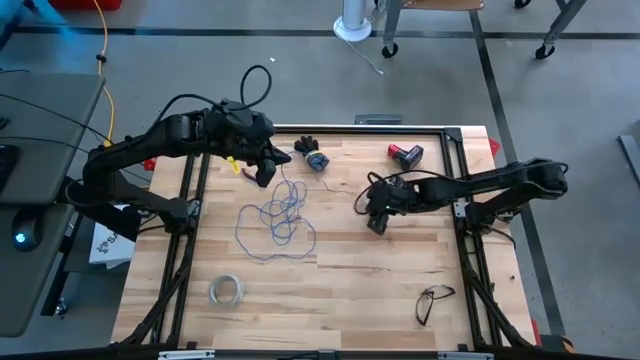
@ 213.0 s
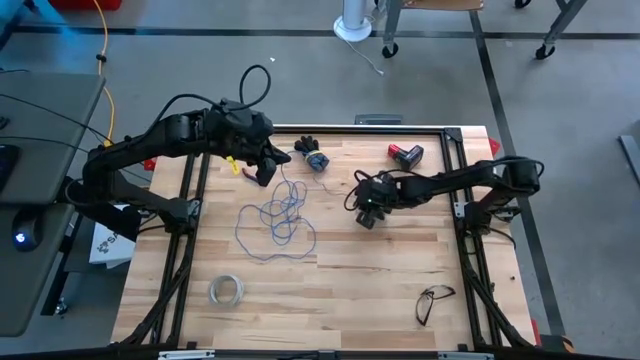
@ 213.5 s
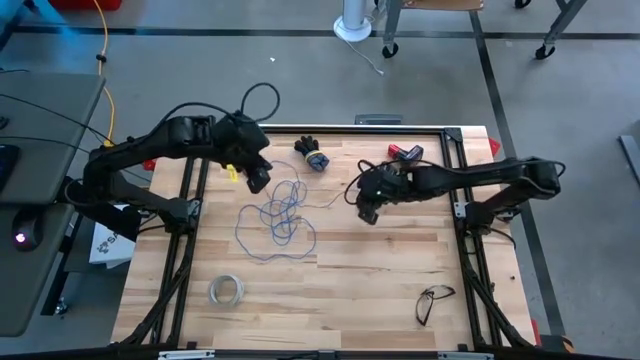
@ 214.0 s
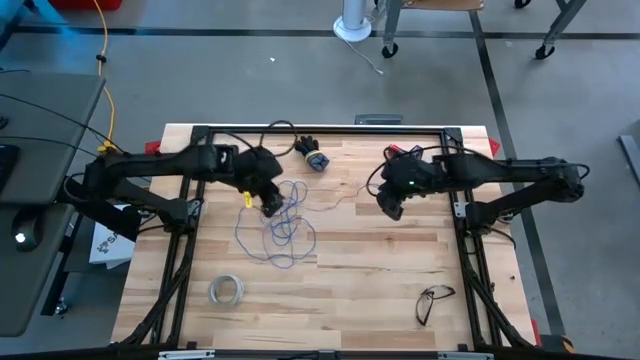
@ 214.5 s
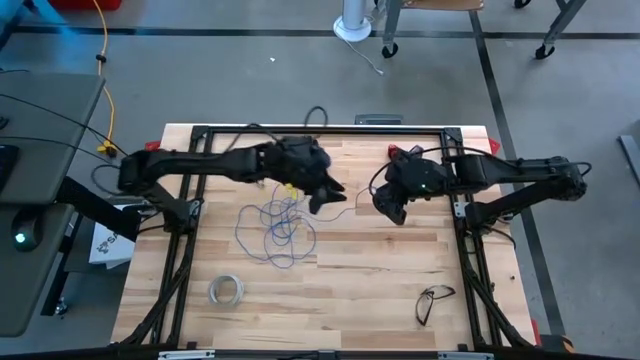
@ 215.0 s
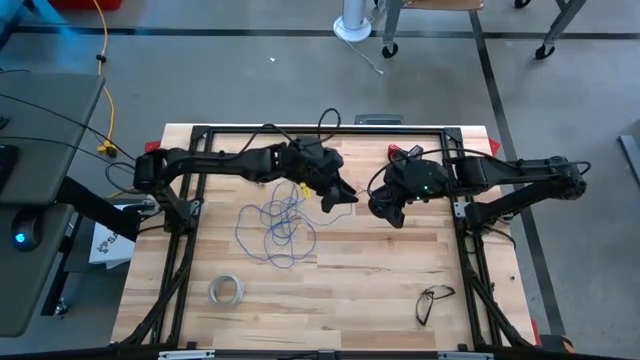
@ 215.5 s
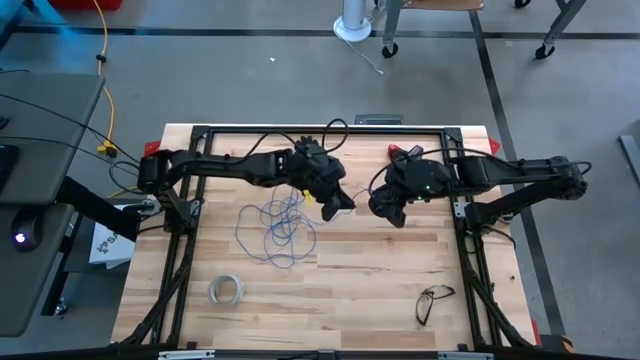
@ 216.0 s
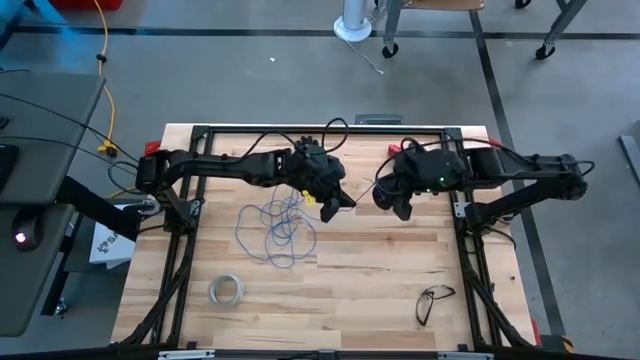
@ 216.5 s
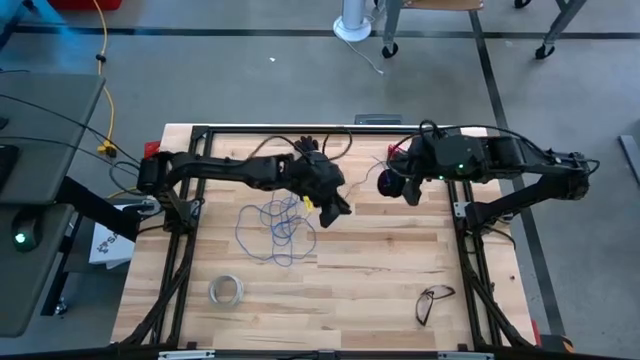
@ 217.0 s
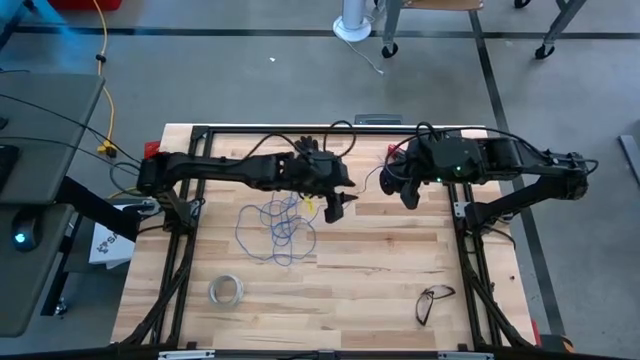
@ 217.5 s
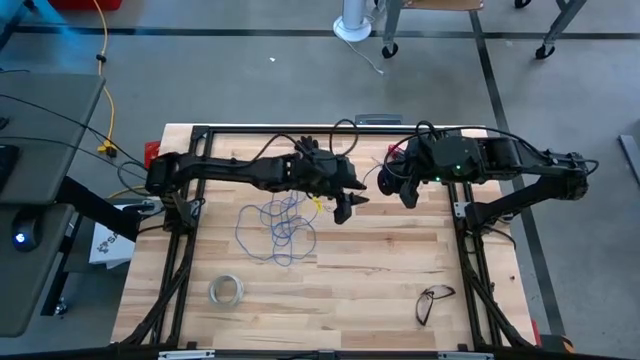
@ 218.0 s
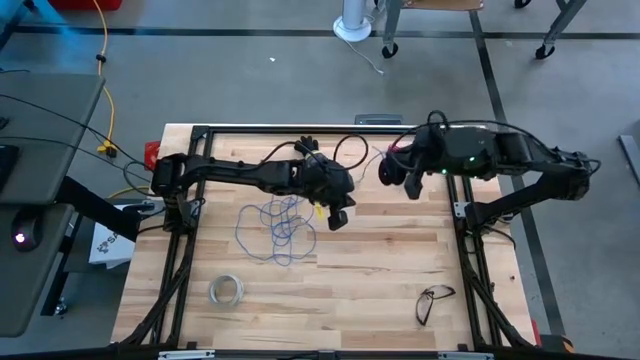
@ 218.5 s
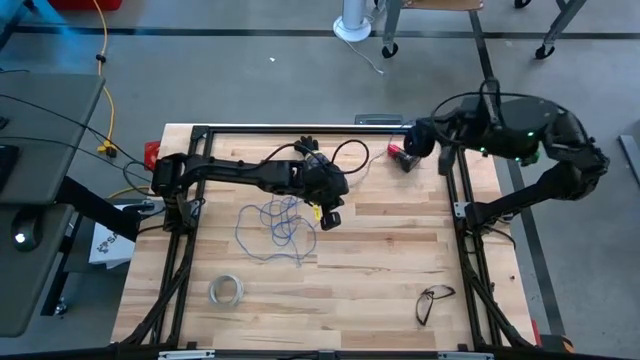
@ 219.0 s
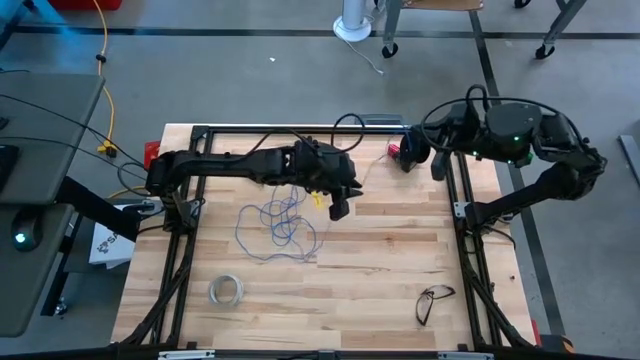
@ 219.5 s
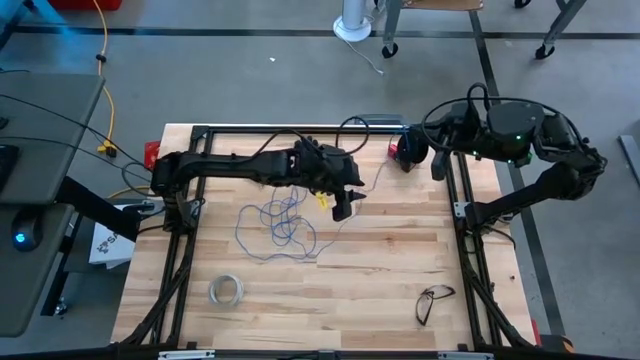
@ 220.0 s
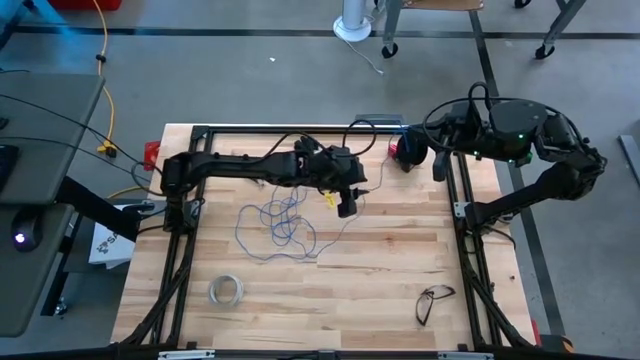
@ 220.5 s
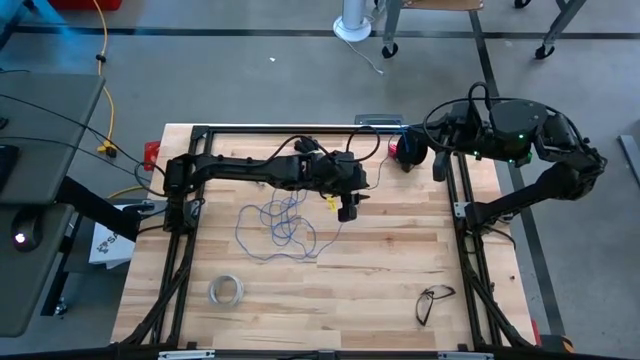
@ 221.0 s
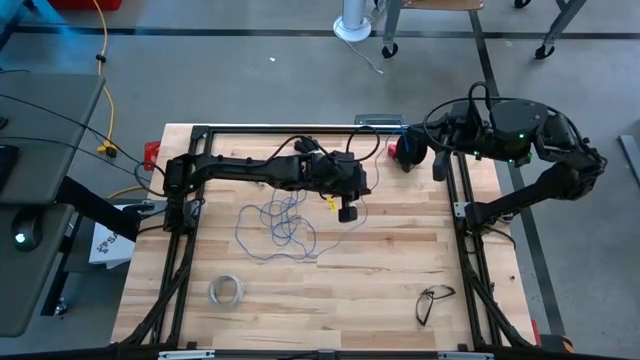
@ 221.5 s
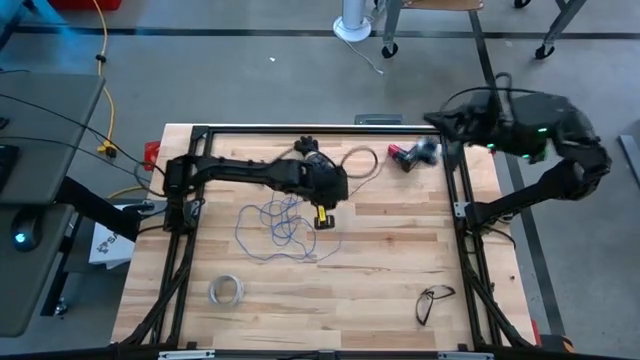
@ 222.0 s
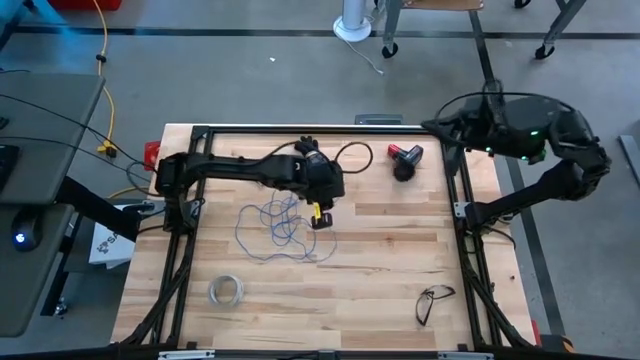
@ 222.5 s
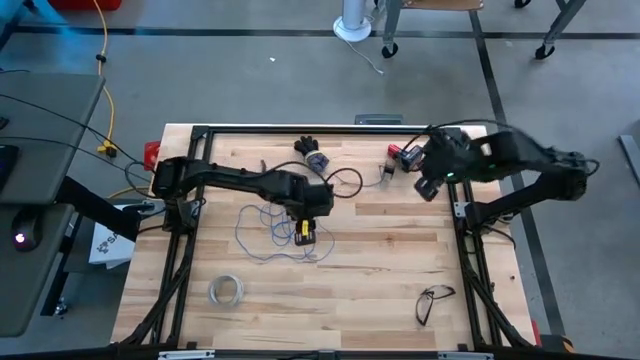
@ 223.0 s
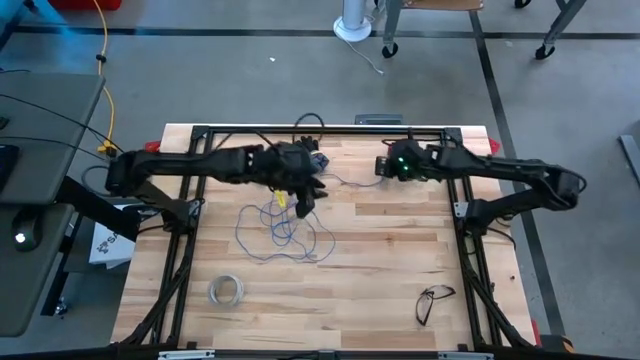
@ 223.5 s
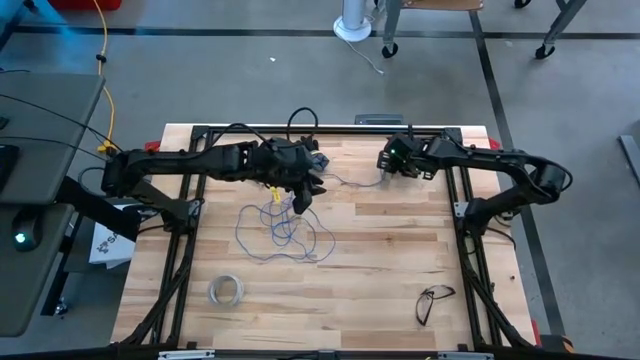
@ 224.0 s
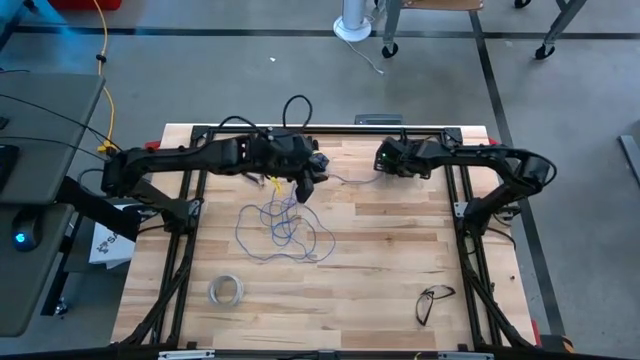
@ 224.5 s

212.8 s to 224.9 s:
Task: Coil cords
Uncoil the blue wire from the black spool

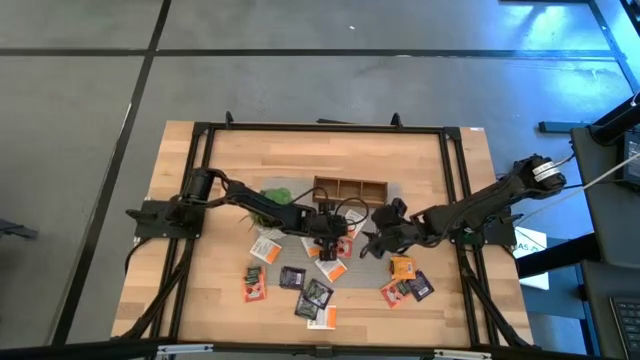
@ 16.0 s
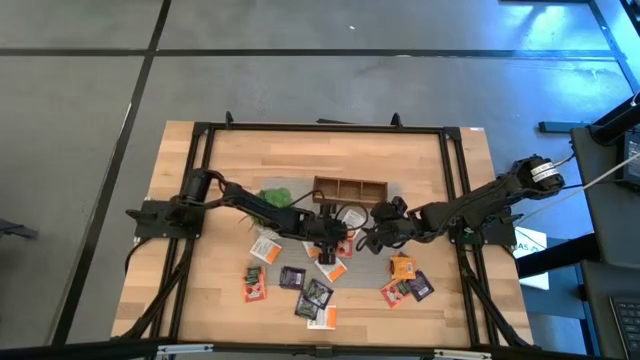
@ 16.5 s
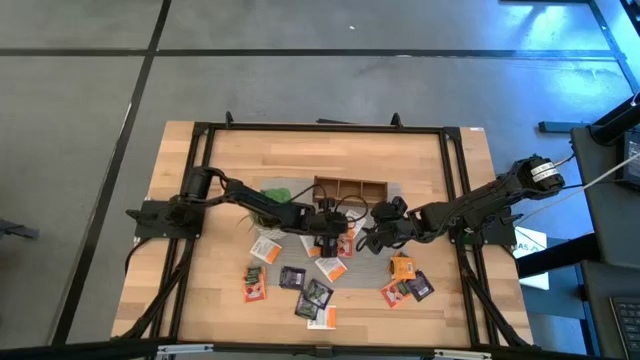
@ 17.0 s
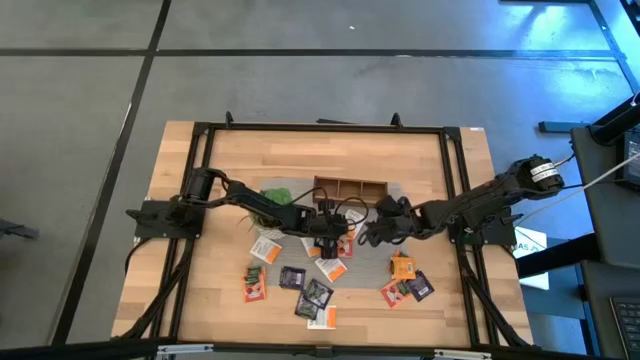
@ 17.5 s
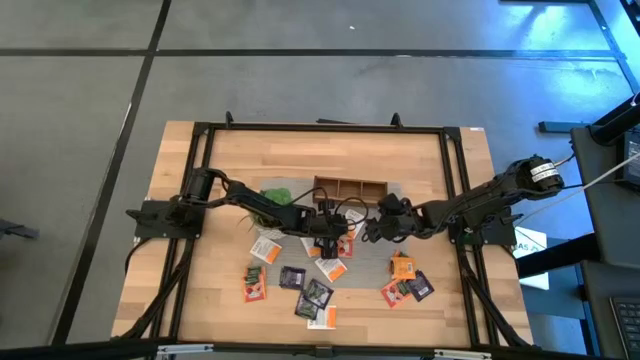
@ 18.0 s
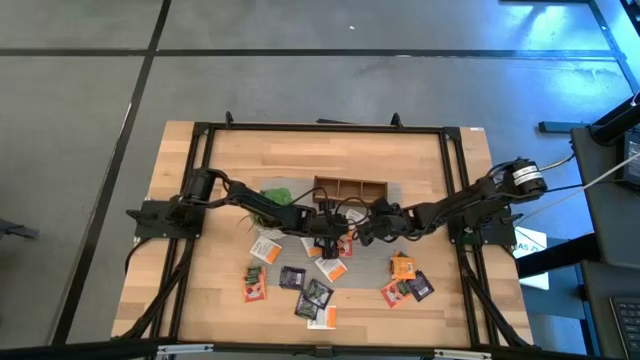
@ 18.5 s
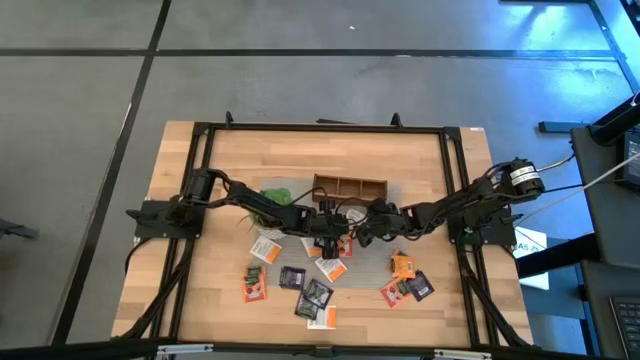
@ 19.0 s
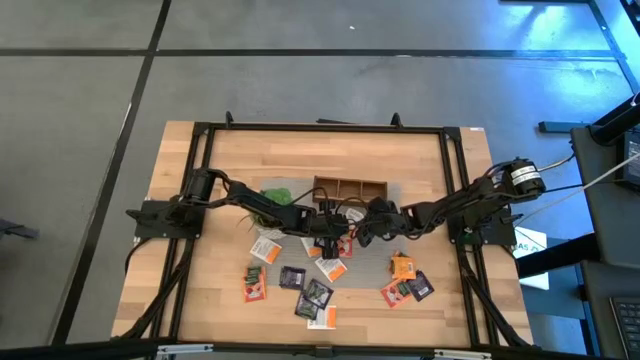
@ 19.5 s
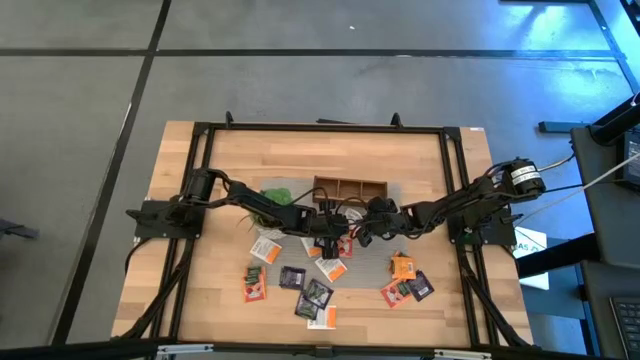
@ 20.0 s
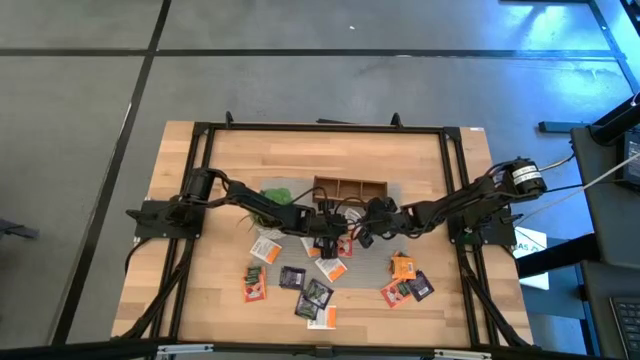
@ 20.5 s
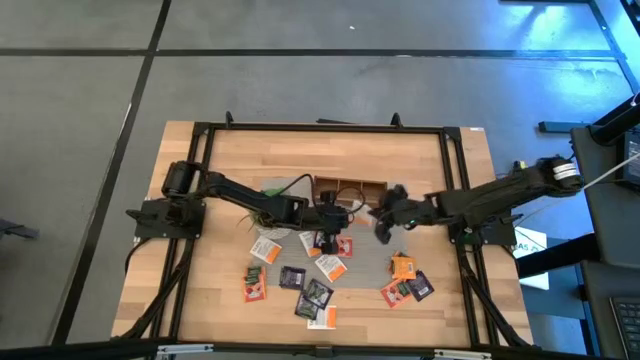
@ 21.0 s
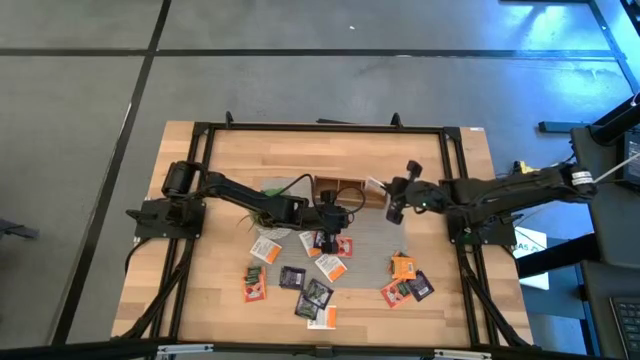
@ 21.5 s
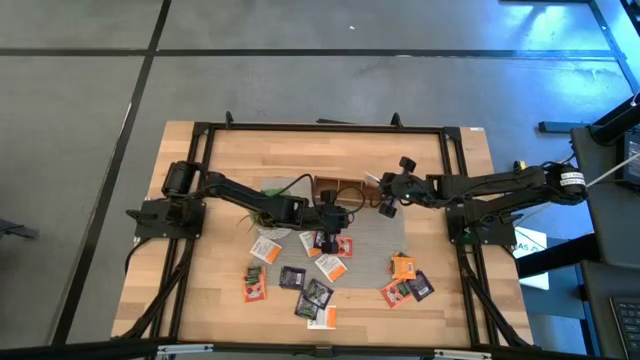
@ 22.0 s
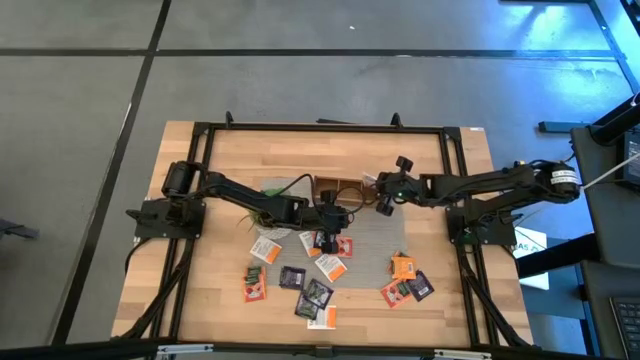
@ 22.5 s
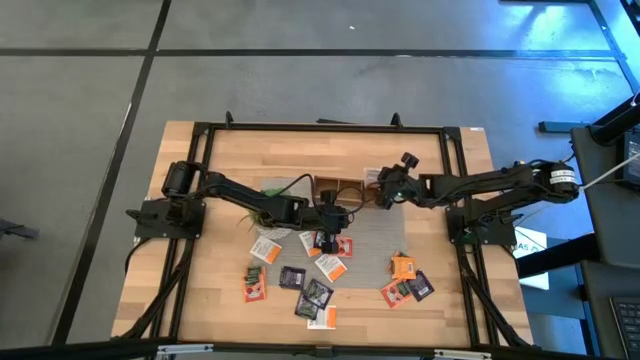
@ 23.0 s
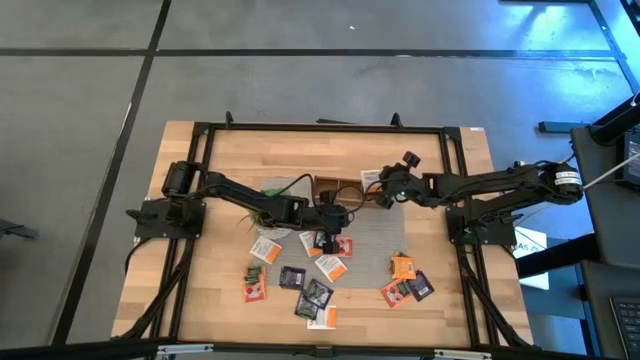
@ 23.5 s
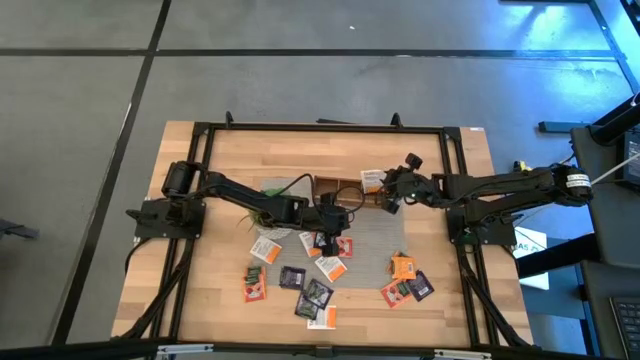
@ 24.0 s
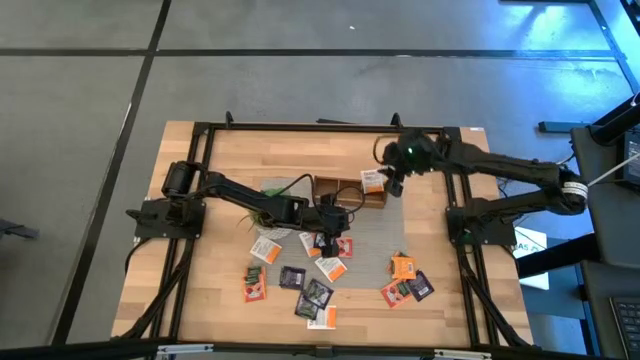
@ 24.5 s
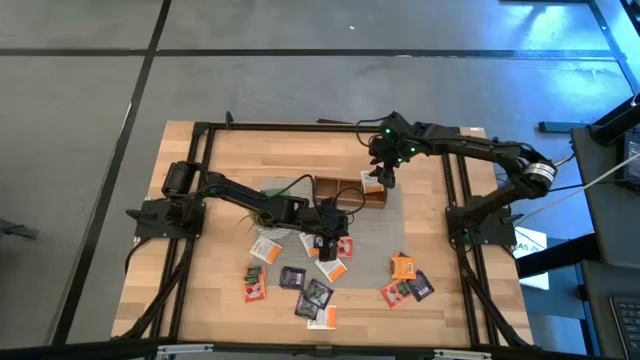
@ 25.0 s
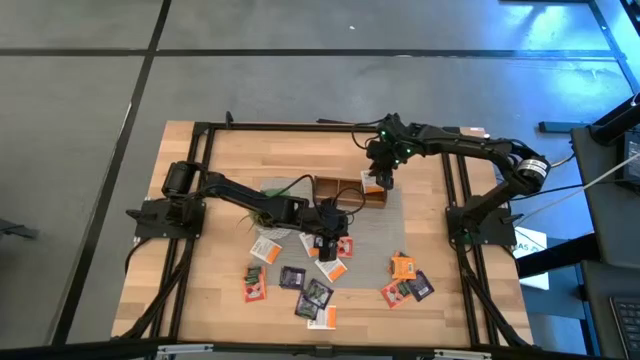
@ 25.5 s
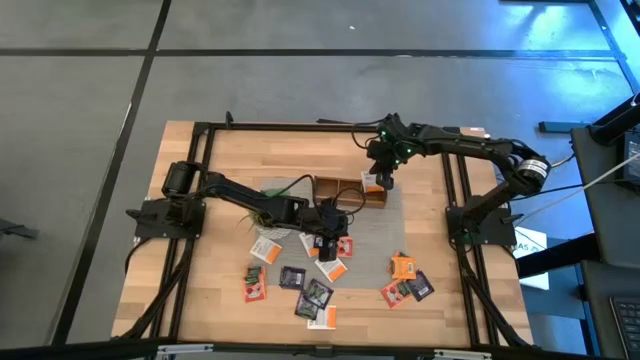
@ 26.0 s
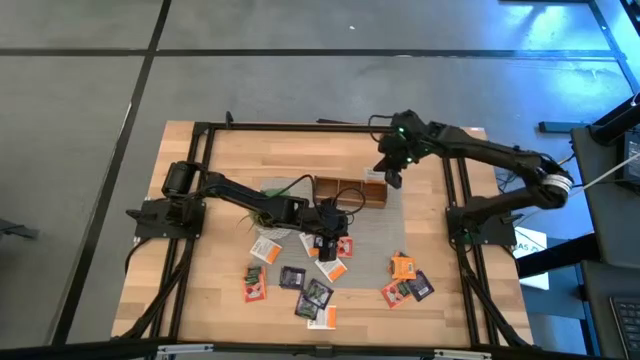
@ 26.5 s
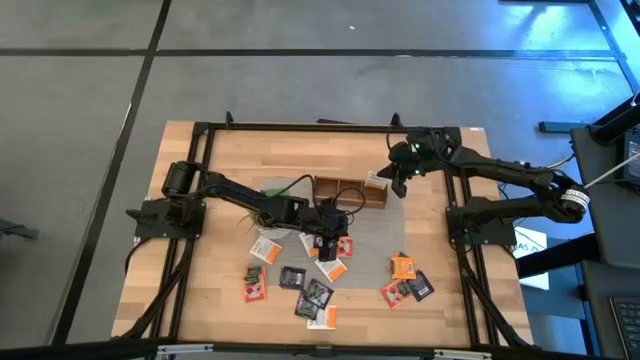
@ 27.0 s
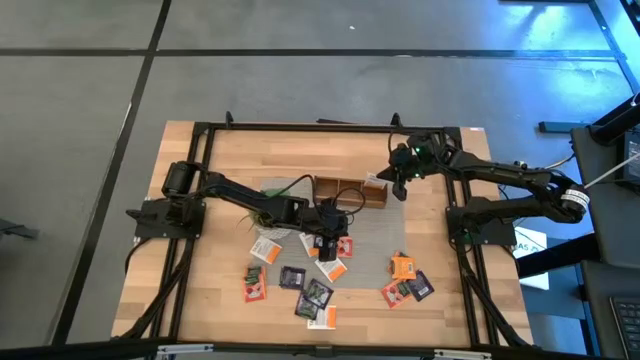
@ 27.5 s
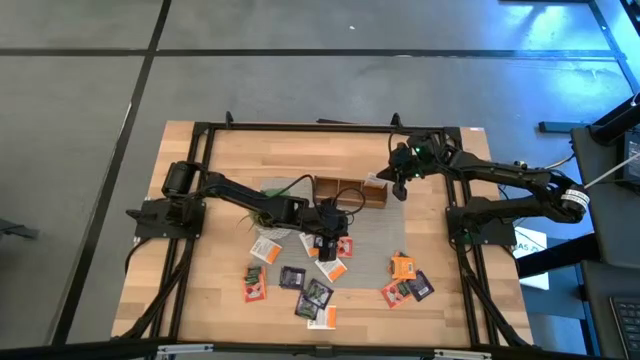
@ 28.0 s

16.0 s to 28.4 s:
Task: Pick & Place Tea
Put the white tea bag into the right section of the wooden organizer
